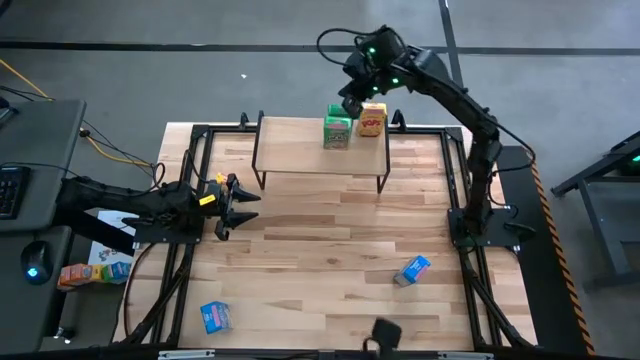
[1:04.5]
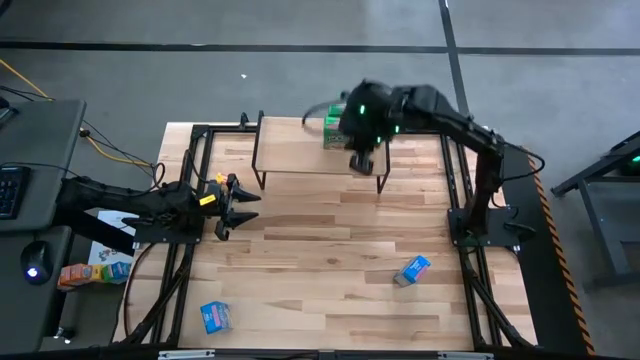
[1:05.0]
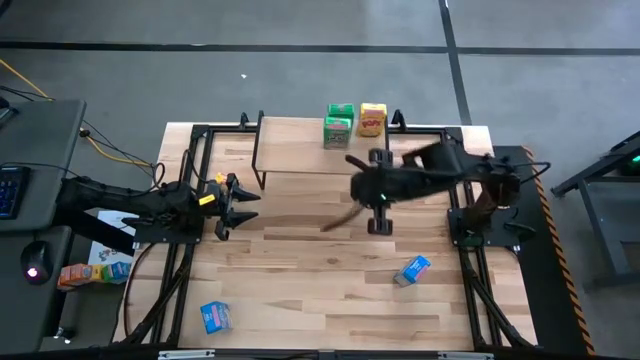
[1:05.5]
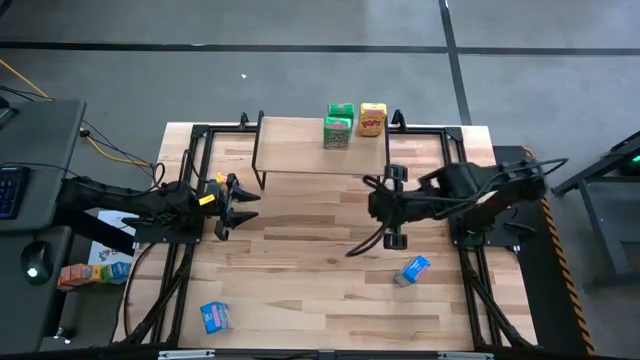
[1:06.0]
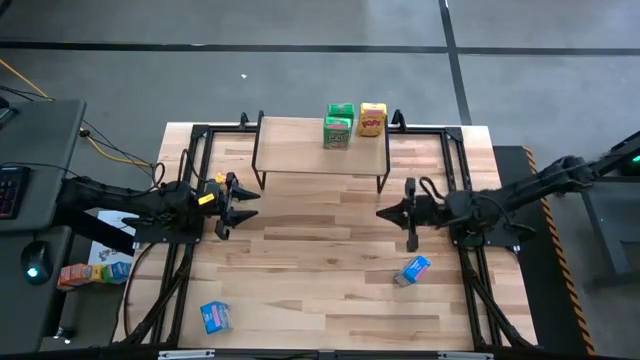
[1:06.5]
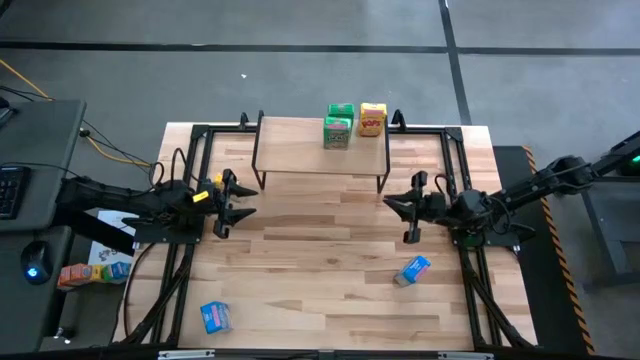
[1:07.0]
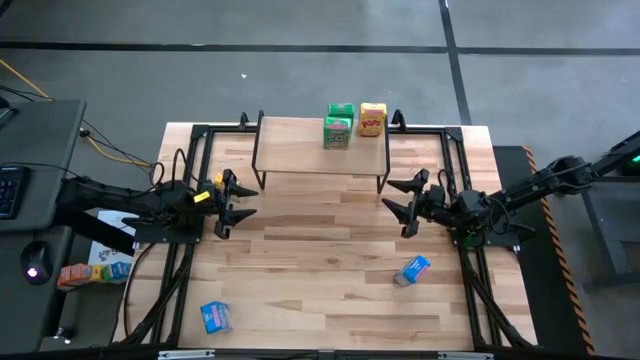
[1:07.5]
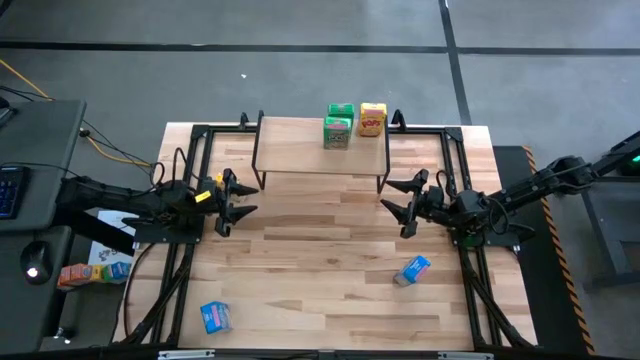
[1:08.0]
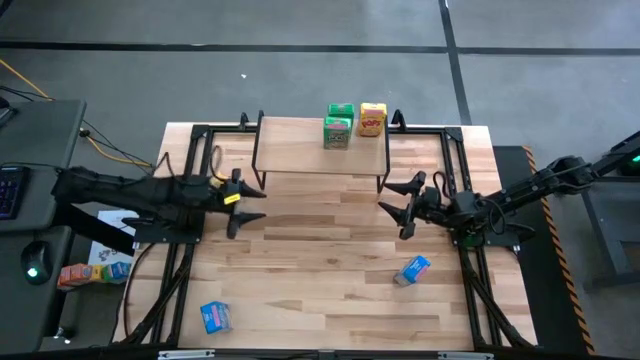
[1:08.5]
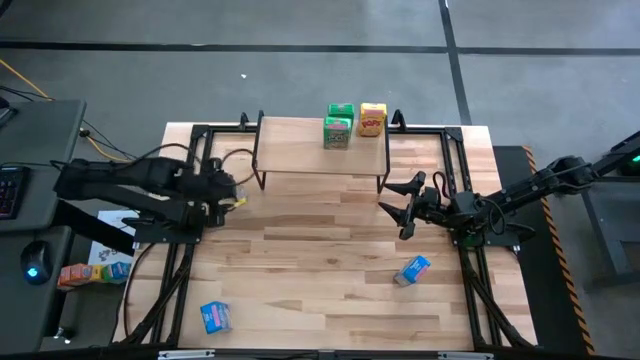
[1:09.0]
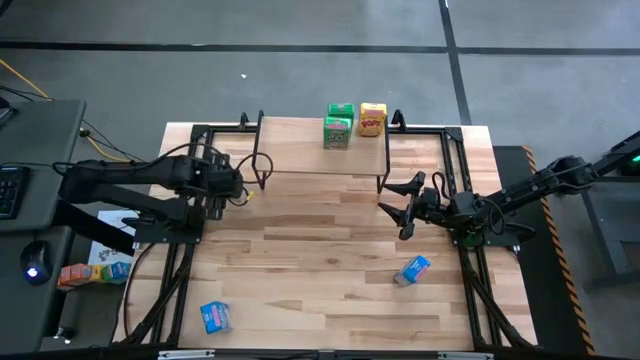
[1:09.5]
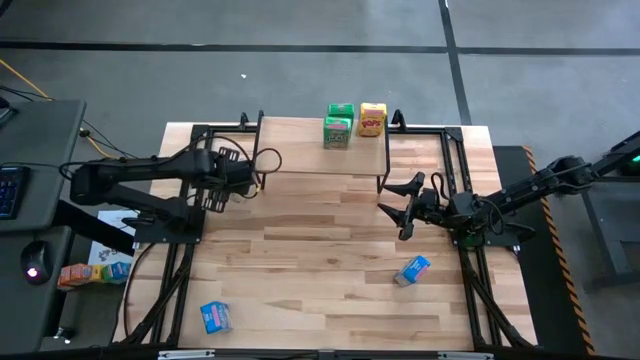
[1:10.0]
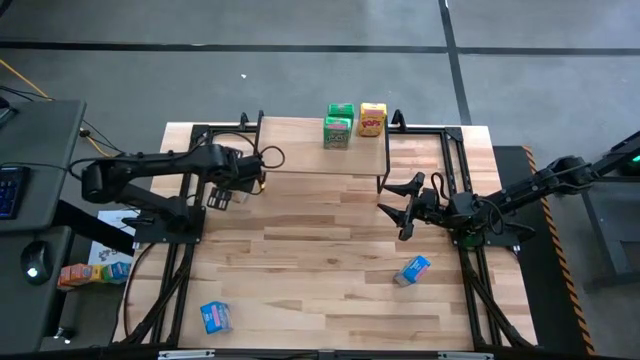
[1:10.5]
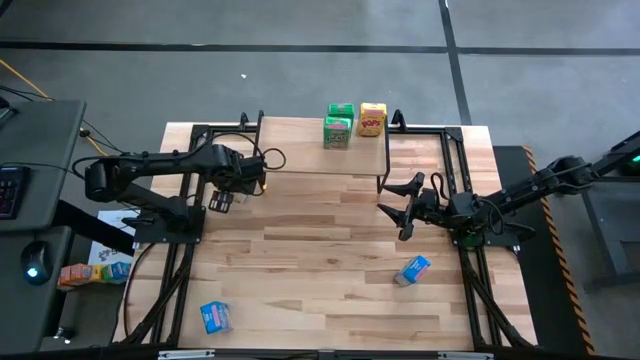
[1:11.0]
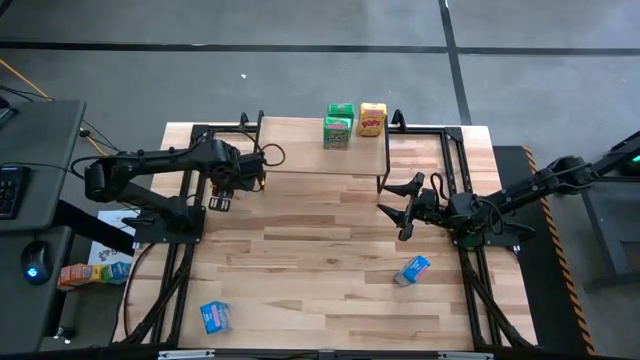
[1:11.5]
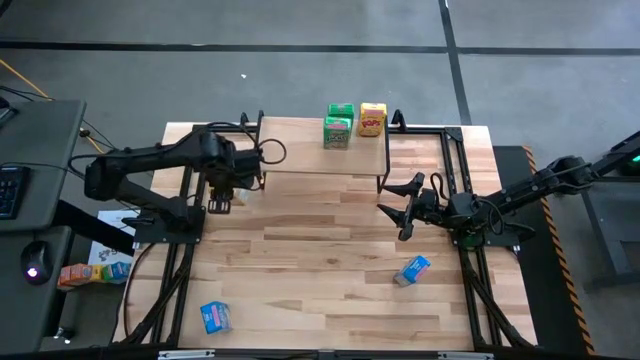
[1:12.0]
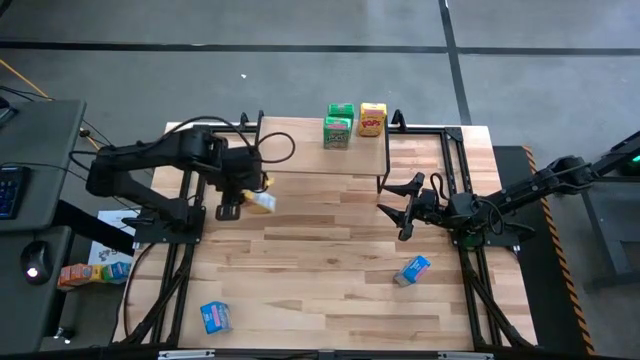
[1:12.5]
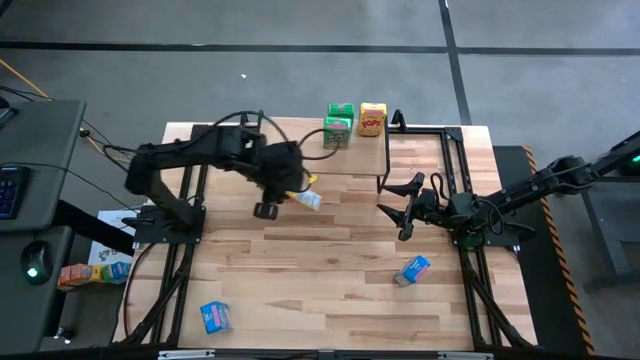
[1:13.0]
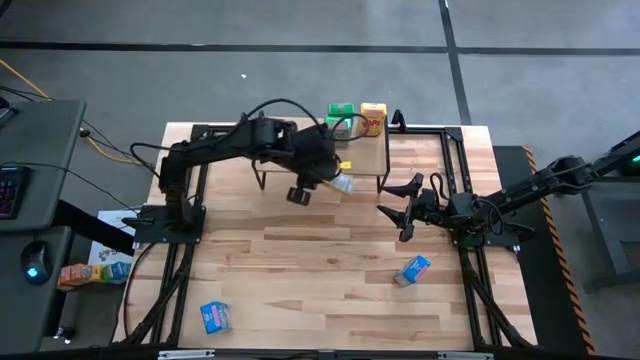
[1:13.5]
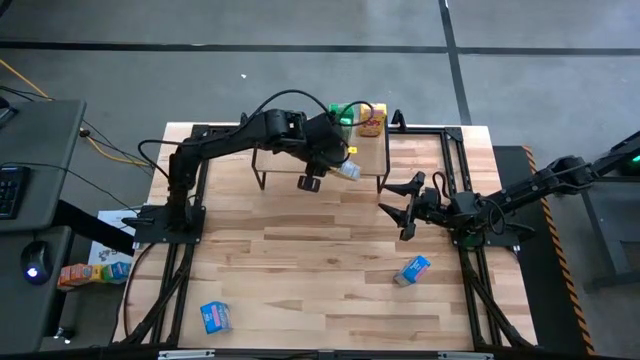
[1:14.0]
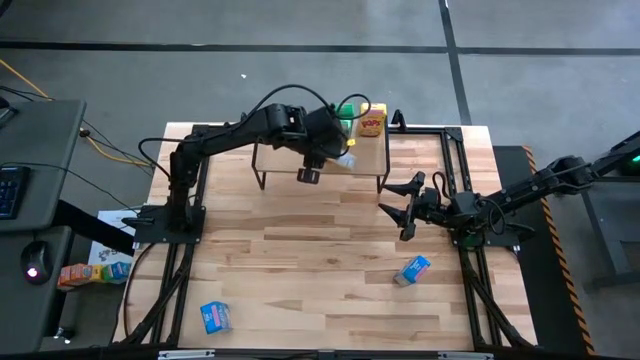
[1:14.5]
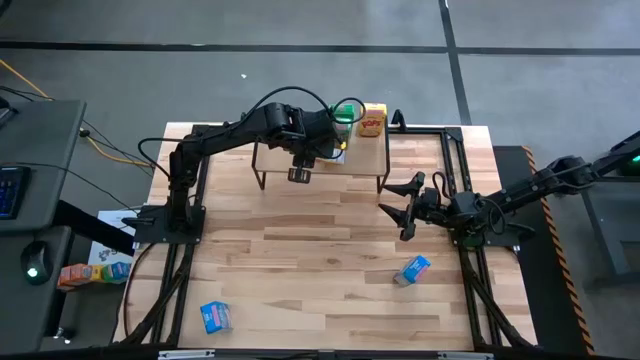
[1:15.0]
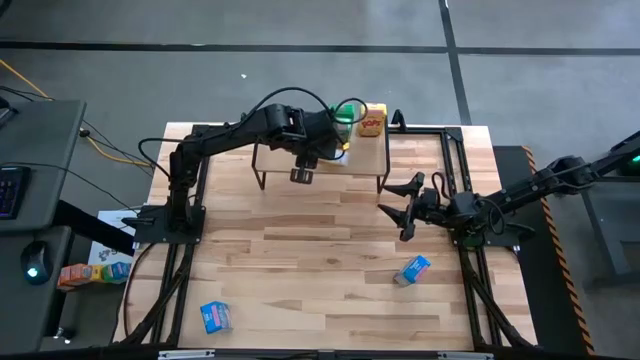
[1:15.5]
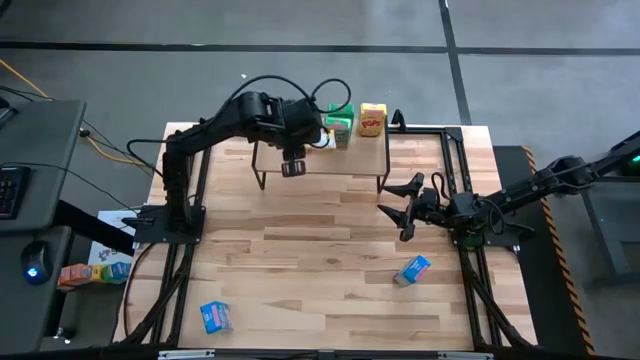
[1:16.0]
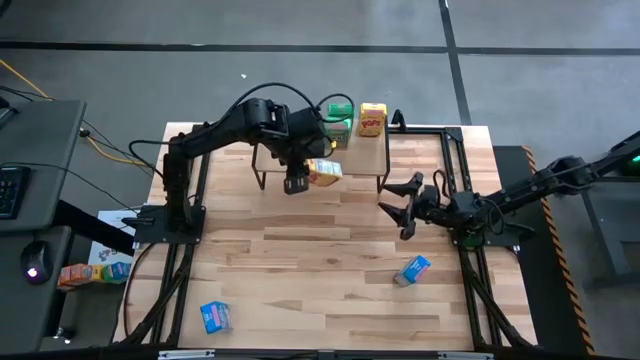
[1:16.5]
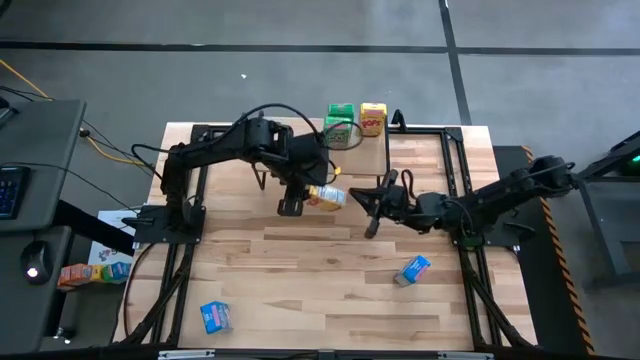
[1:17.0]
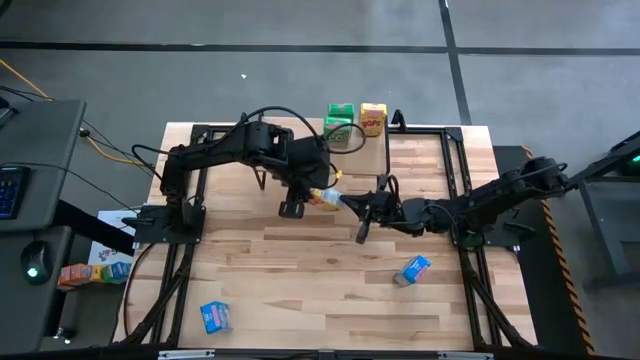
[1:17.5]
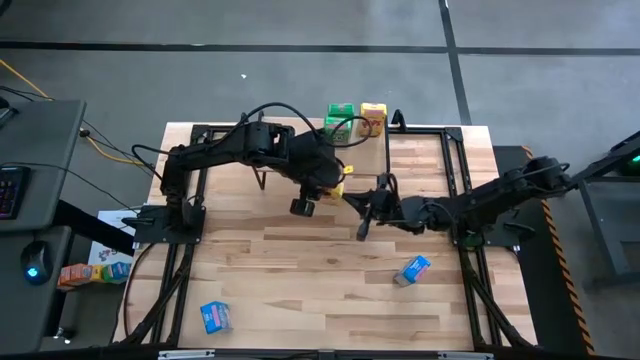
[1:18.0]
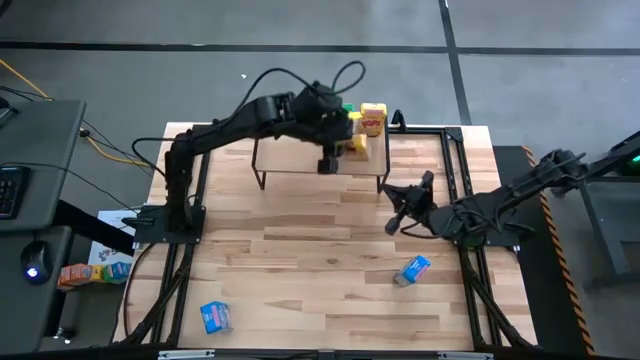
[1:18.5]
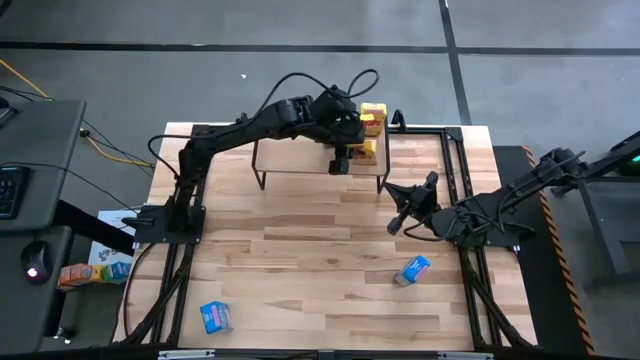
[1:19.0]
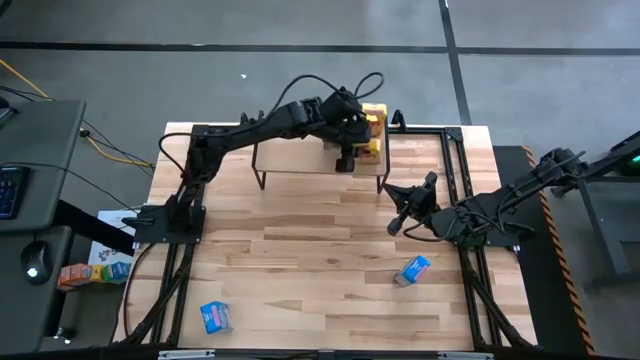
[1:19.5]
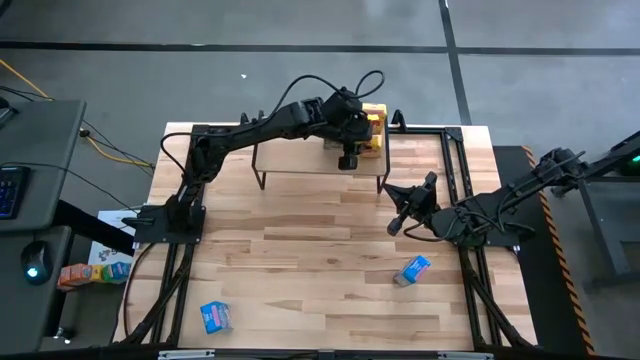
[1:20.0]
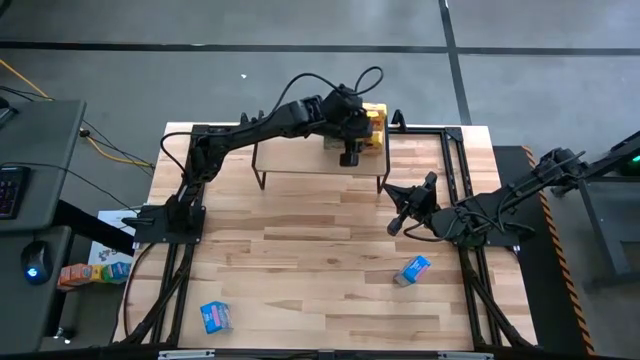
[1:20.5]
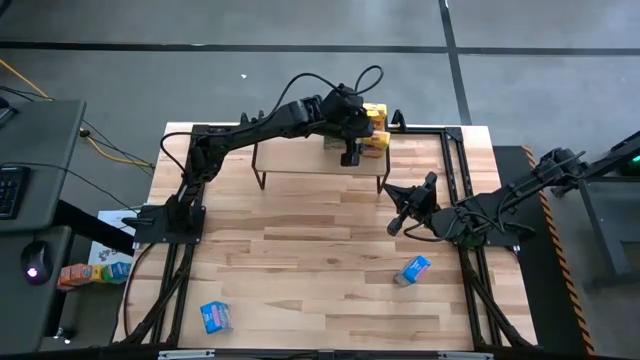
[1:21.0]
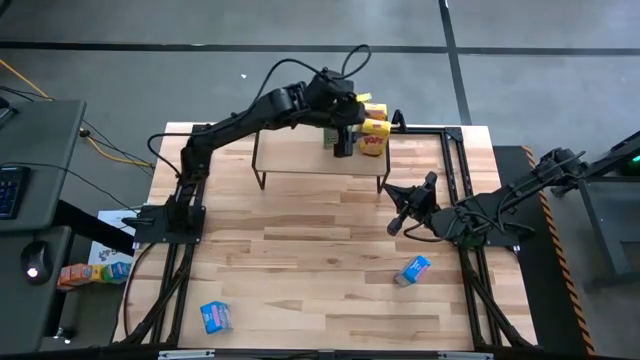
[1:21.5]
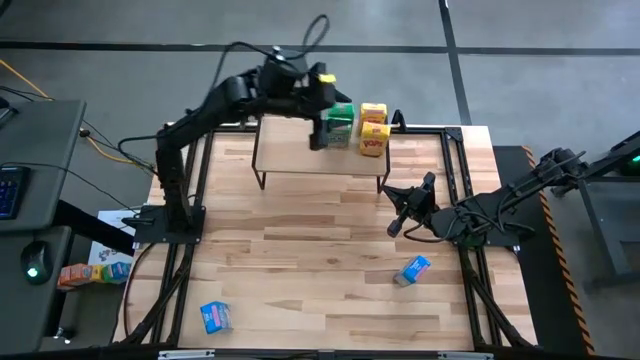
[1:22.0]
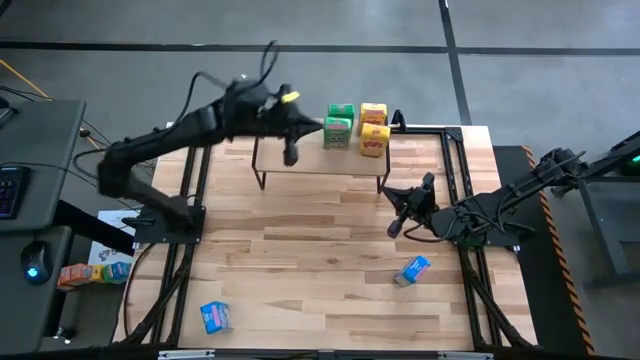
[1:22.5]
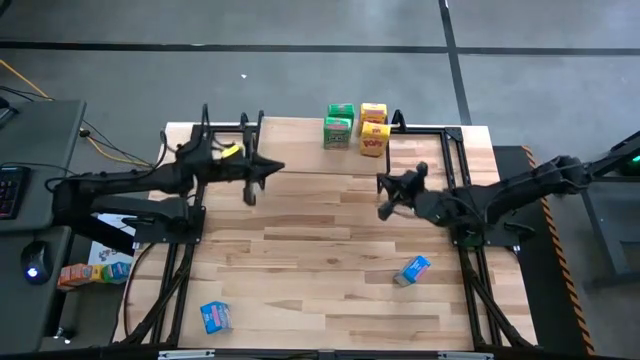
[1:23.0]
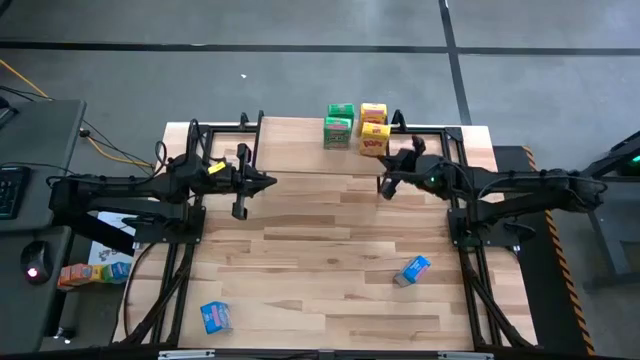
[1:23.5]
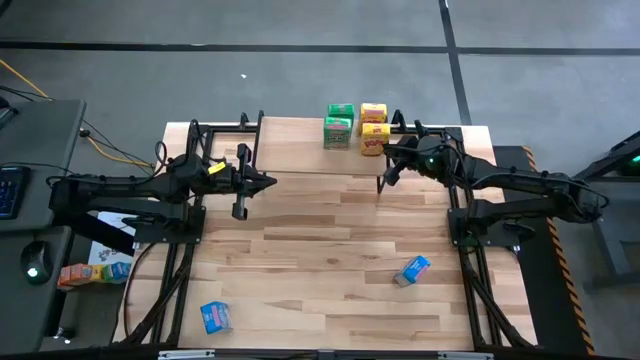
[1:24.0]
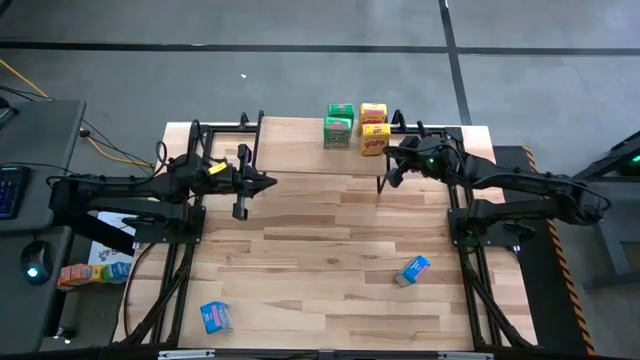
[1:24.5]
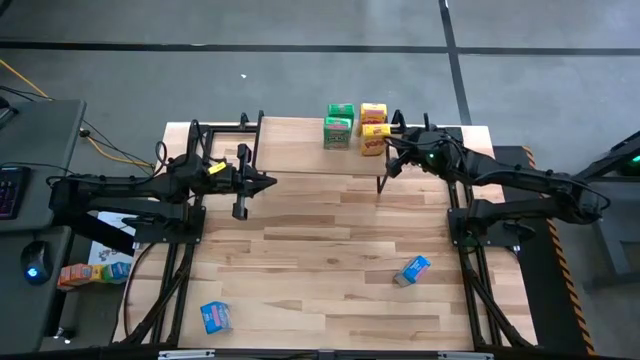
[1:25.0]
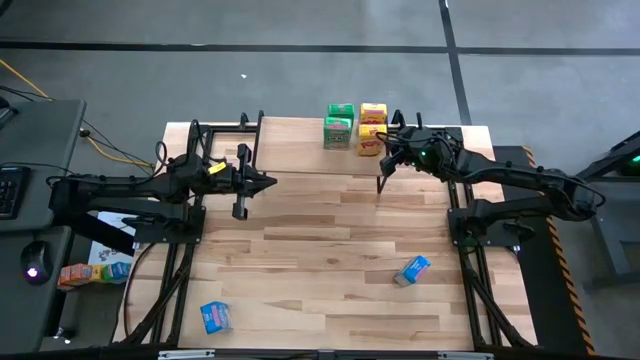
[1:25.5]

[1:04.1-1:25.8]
Task: Stack cereal on shelf
Put the yellow cereal box on the shelf aligned with the other yellow cereal box
